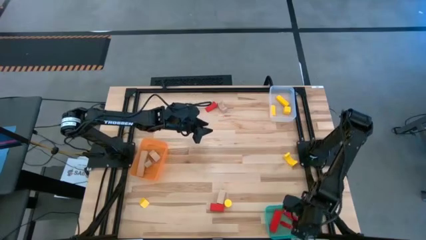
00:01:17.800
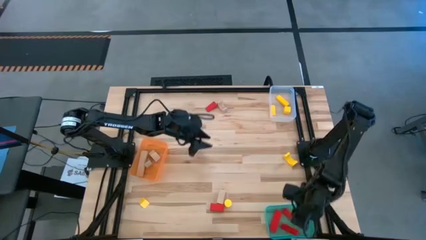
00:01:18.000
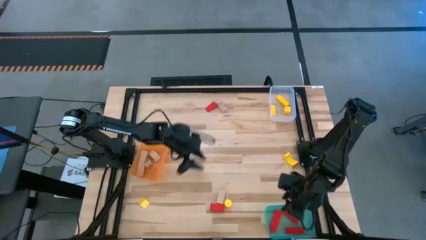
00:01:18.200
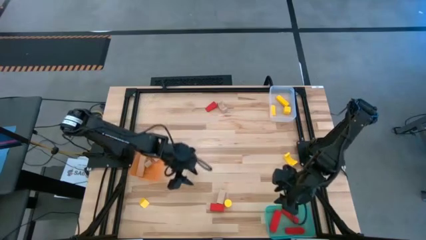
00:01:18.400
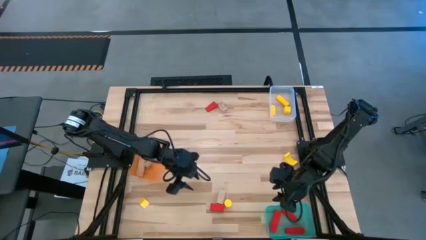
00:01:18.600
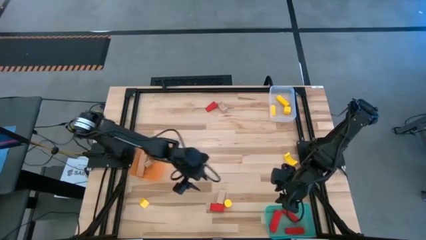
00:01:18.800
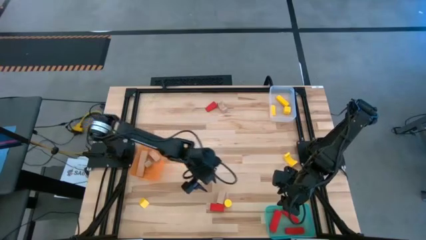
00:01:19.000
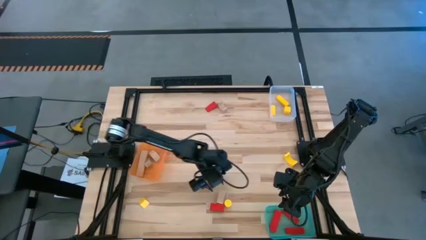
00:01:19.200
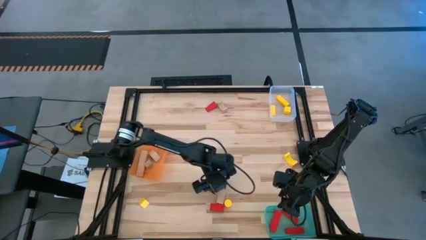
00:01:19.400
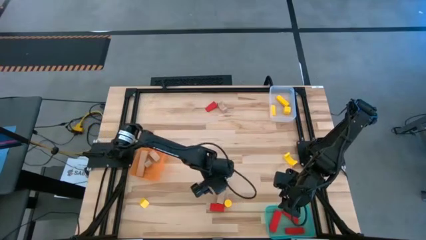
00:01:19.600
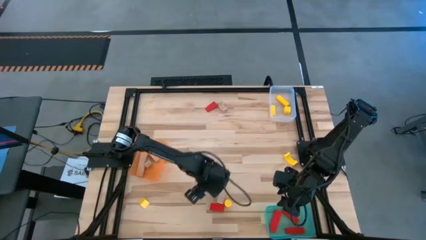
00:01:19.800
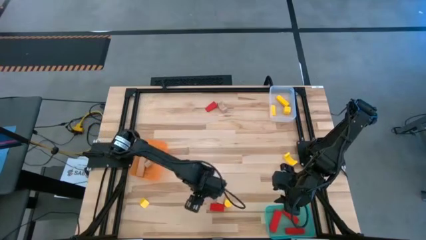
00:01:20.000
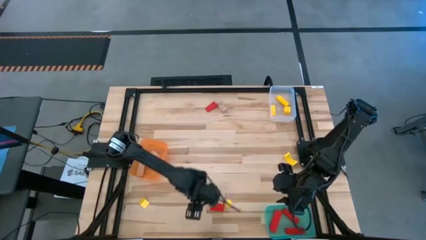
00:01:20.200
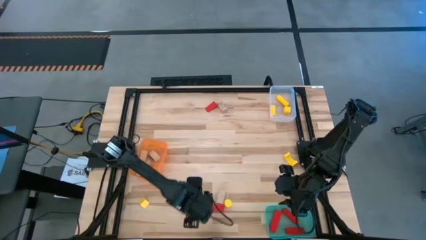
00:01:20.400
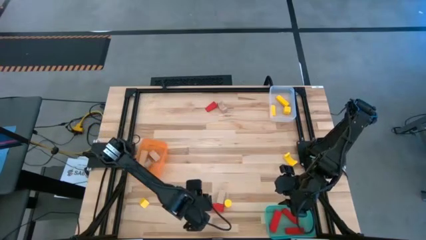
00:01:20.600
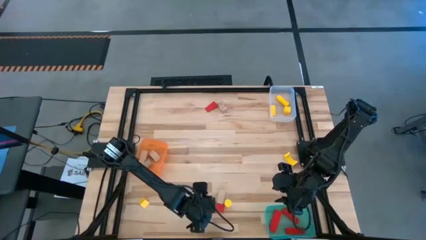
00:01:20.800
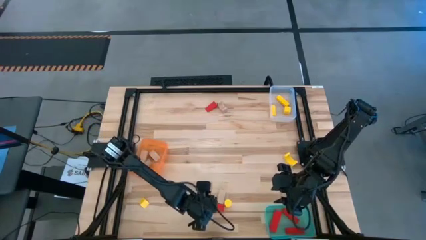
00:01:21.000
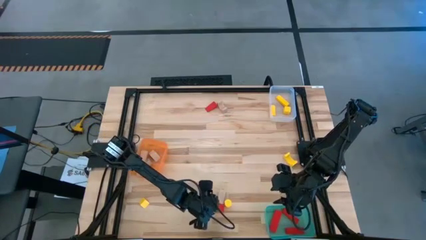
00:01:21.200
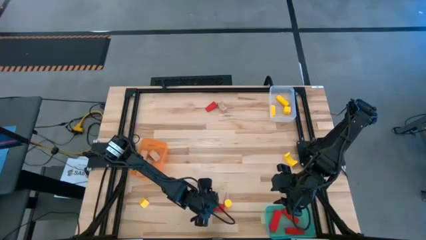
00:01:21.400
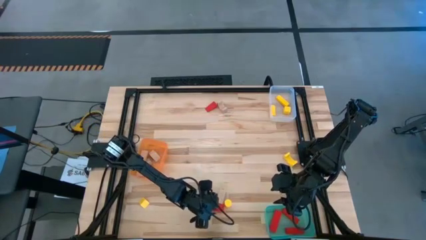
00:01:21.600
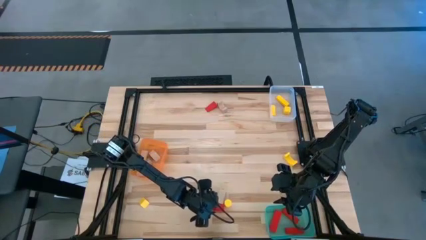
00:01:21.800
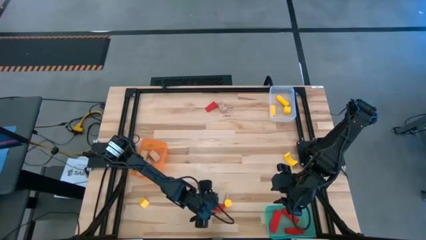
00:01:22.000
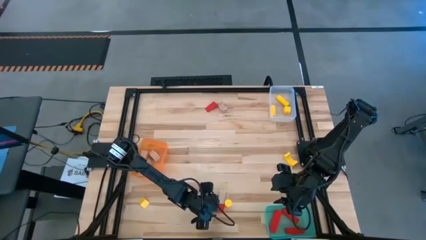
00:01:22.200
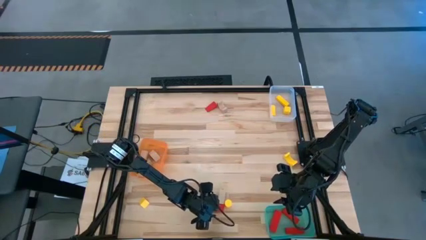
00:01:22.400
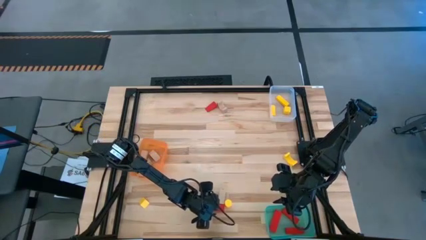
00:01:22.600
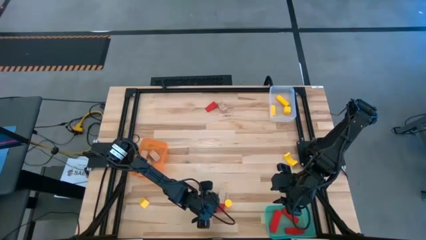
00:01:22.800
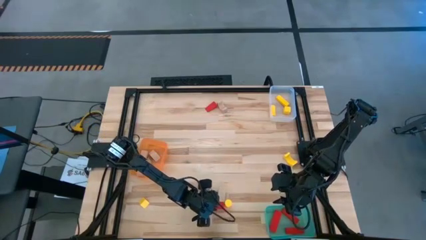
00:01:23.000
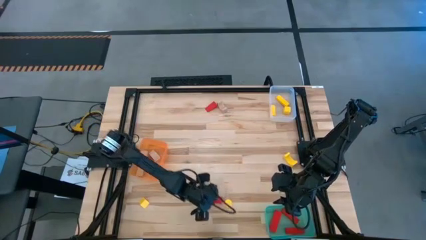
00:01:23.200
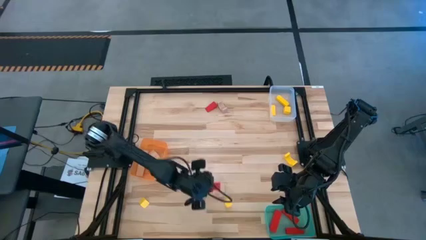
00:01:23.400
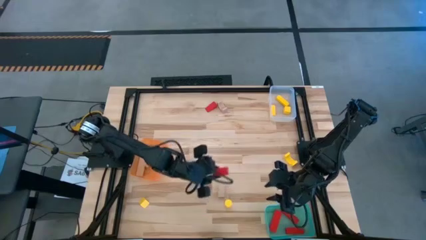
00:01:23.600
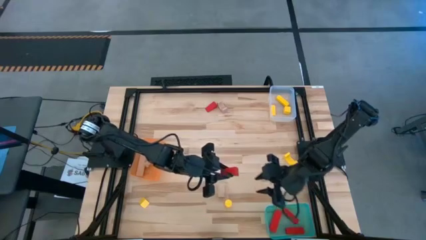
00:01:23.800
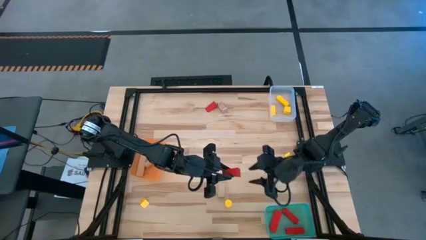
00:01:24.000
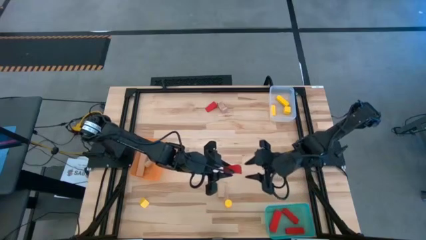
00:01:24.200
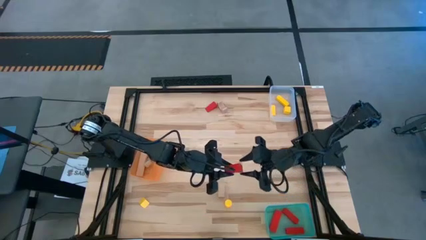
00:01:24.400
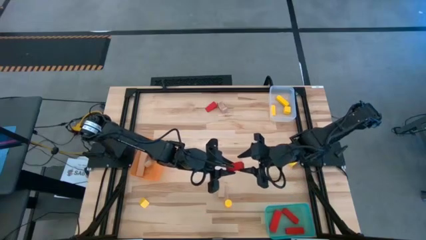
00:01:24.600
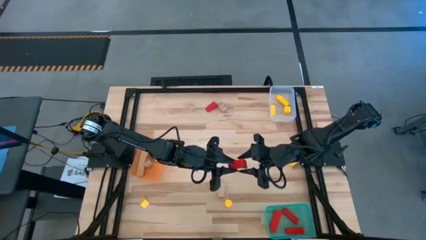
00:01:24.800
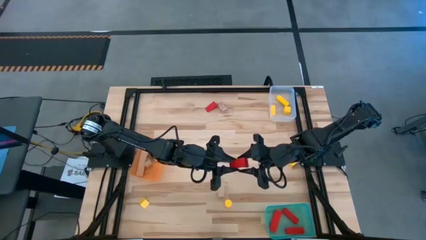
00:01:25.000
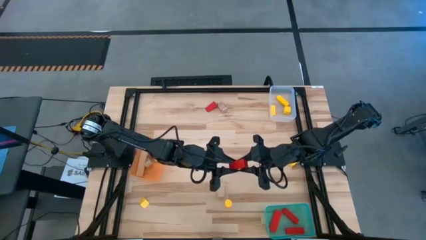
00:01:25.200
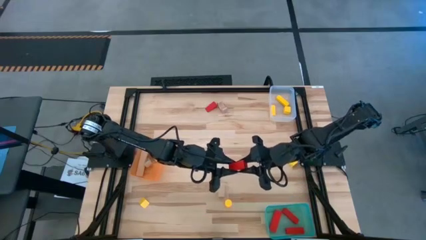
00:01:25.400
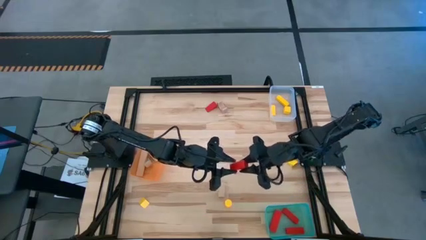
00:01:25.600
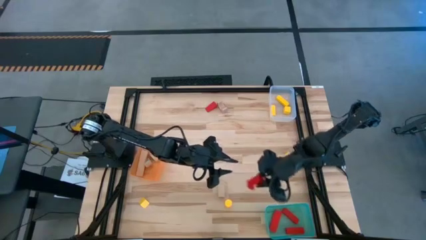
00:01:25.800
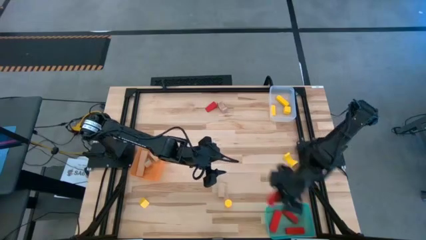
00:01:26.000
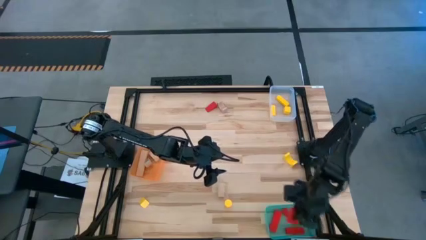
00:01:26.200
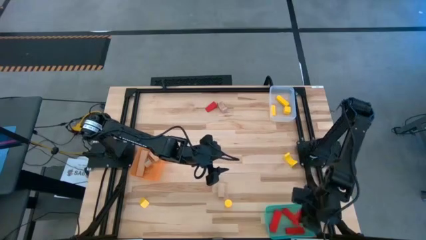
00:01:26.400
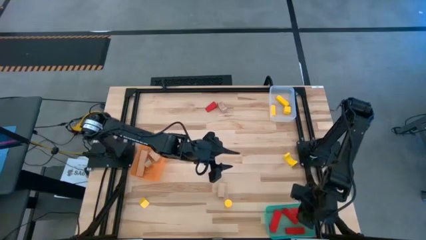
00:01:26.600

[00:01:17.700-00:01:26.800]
Task: Sort & place blocks by color
Put the red block into the green bin

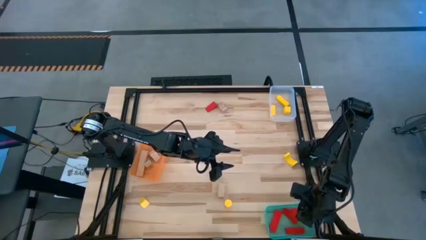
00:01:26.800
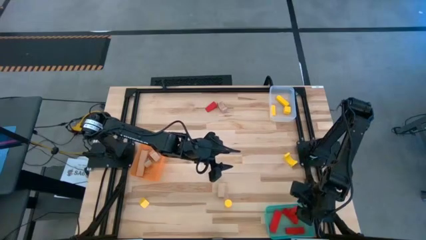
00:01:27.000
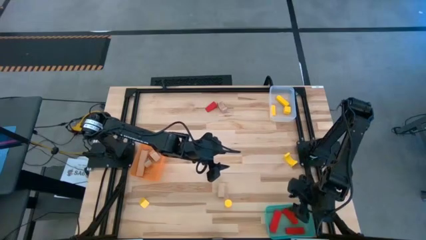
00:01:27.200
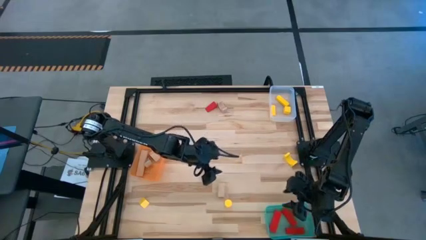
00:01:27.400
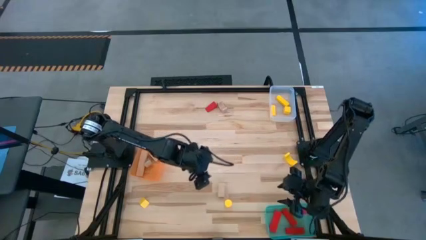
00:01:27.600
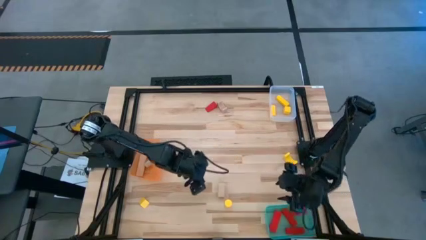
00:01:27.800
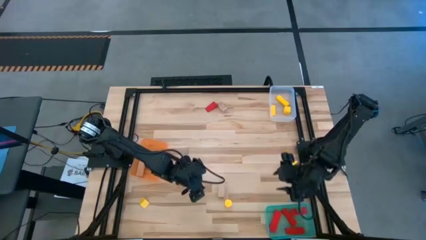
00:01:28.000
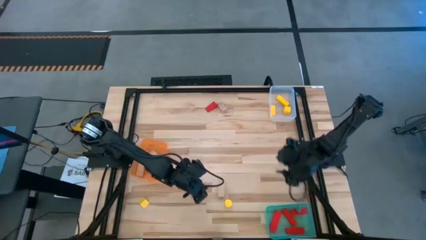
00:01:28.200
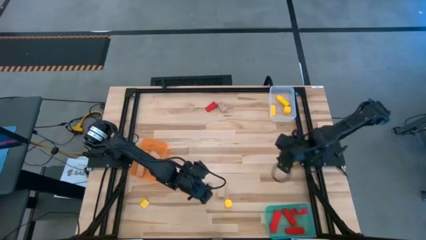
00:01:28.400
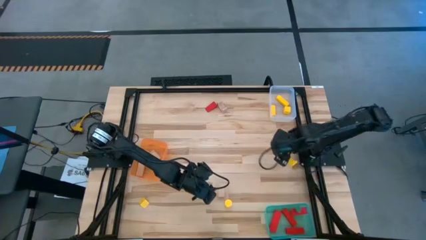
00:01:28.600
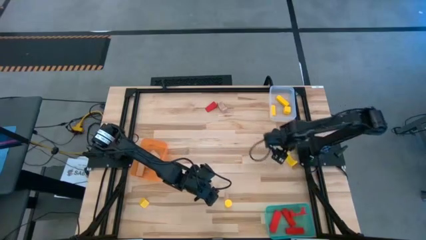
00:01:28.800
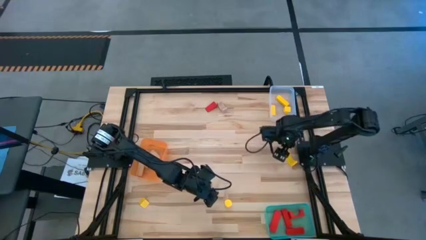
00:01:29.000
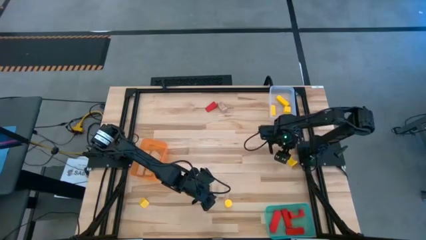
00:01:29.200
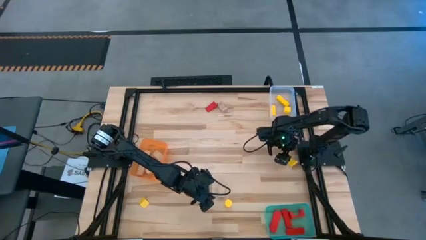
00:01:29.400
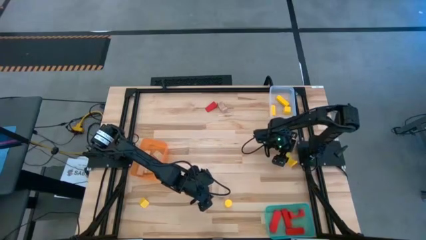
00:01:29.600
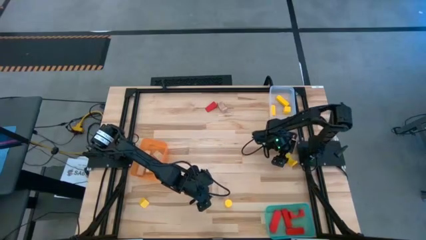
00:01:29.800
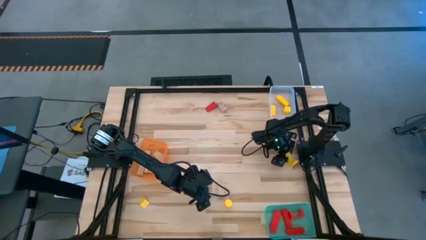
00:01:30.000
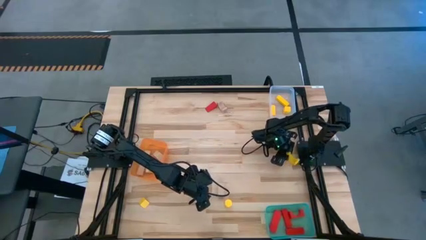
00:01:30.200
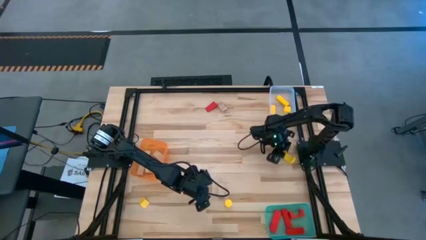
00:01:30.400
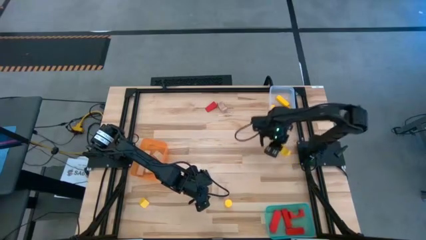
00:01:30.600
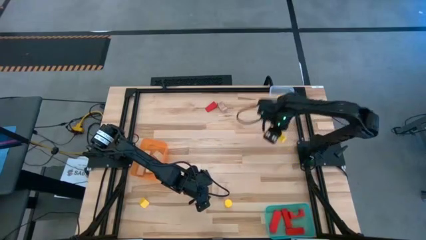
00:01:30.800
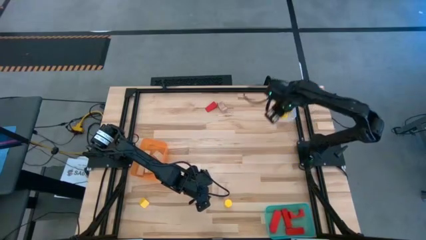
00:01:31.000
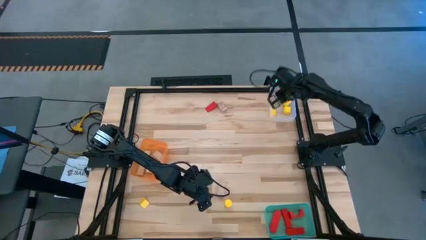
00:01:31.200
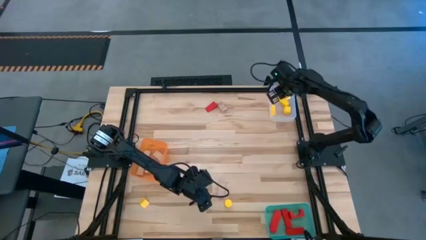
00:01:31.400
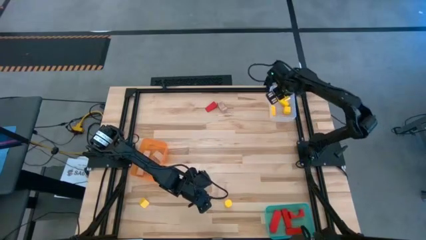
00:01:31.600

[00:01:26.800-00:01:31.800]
Put the yellow block into the transparent bin

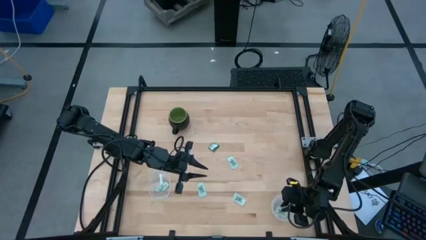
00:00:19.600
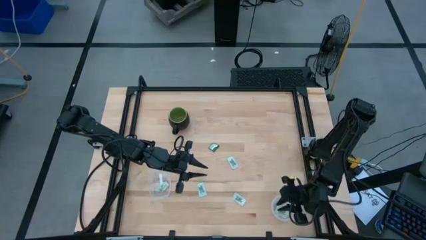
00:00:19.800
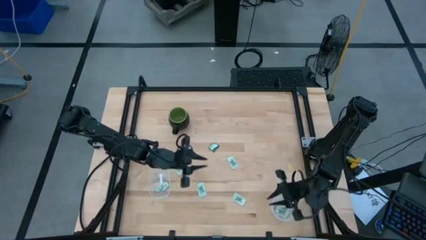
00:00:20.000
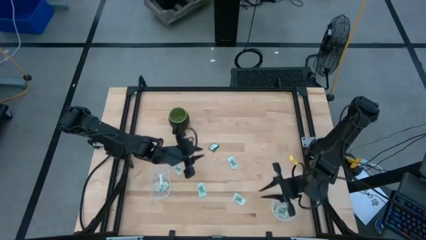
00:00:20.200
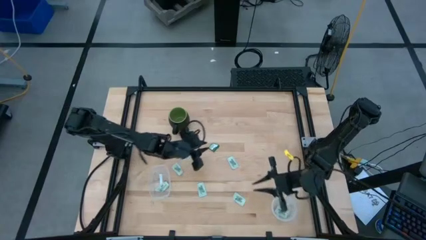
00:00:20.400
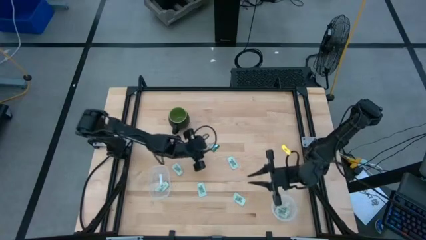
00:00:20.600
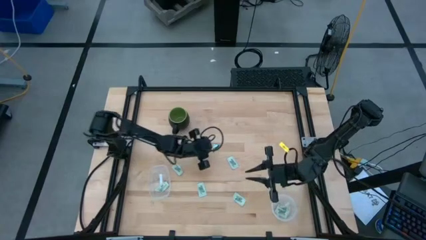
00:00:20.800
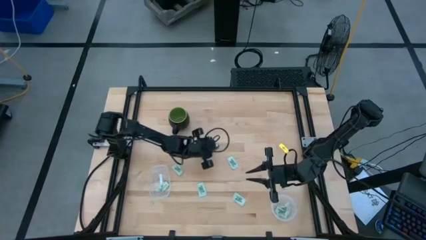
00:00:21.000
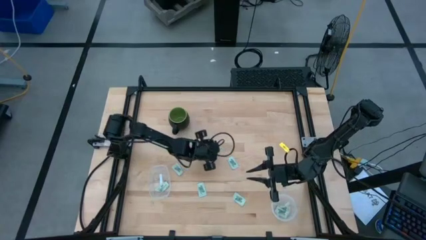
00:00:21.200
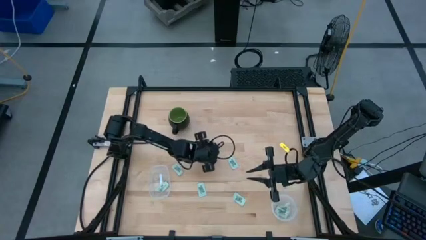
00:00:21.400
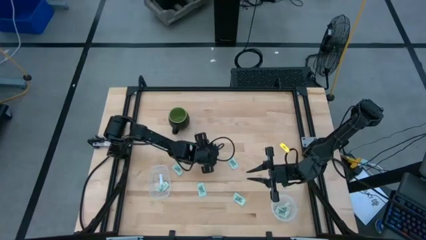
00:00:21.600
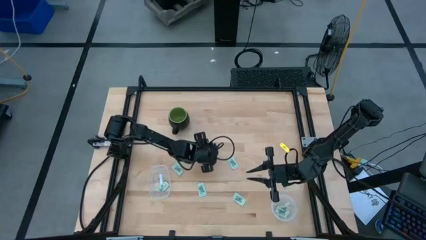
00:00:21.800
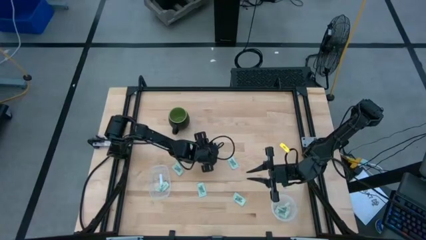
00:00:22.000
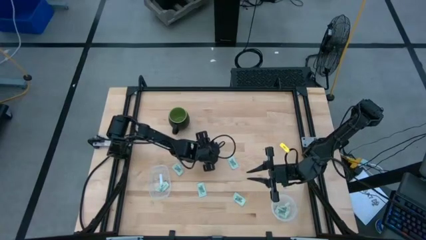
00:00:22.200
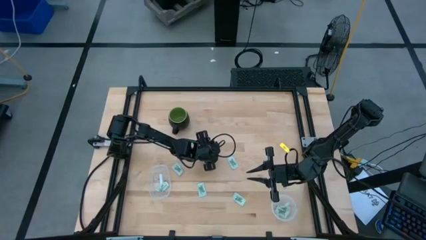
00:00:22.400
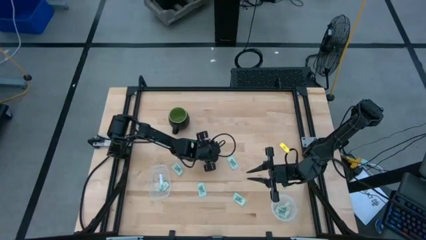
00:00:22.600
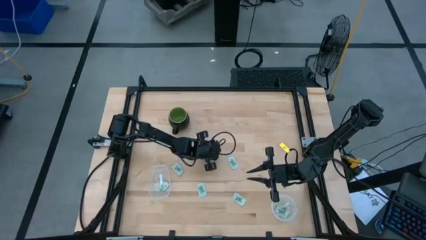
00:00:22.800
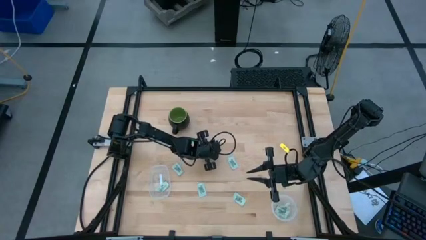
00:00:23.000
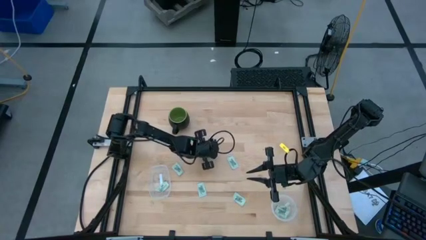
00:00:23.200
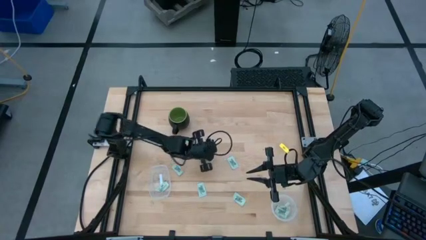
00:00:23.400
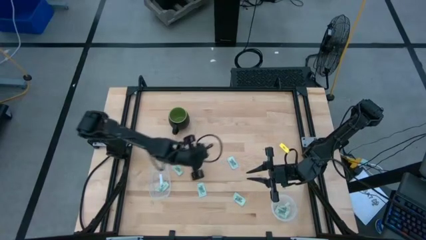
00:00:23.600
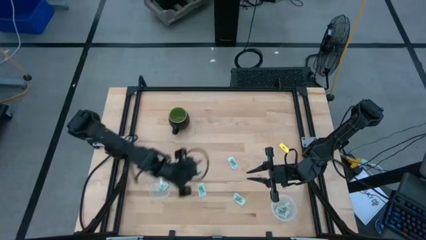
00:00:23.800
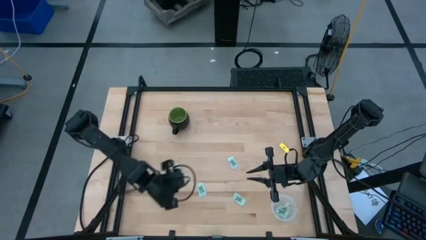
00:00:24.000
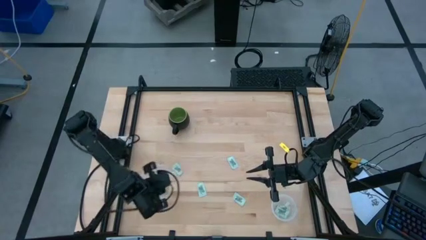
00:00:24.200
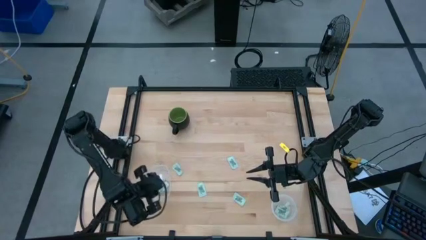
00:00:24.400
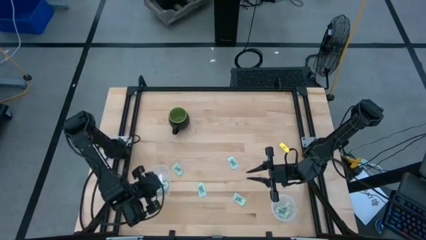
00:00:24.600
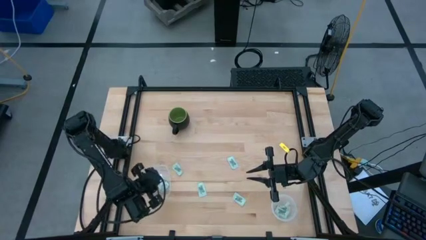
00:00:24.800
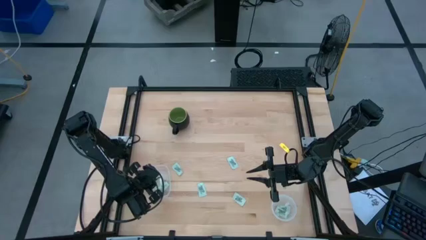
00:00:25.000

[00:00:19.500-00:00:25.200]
Task: Pick and place Stevia / Truvia into bins
Put the Truvia packet into the top left transparent container
